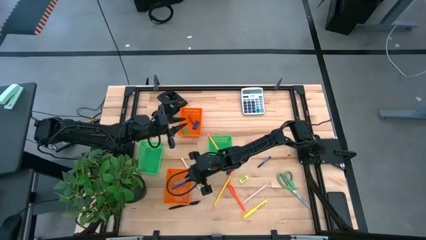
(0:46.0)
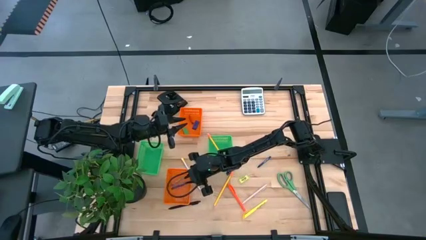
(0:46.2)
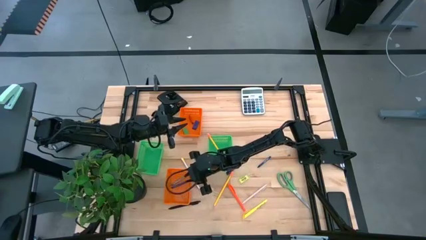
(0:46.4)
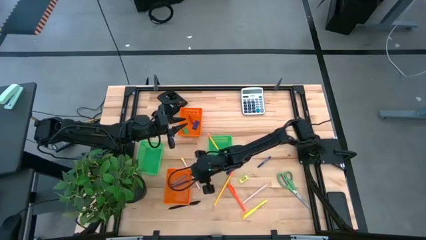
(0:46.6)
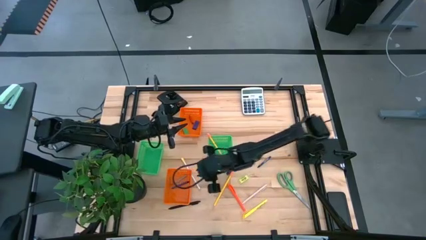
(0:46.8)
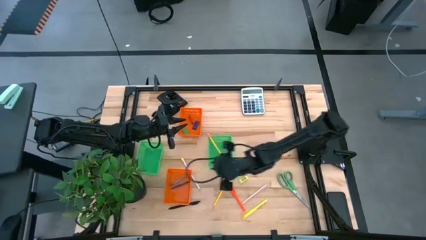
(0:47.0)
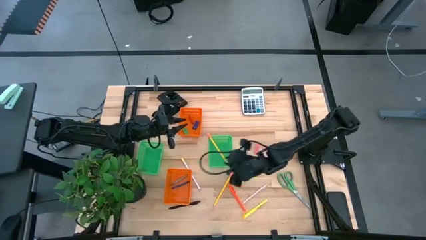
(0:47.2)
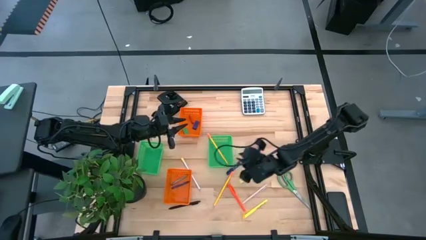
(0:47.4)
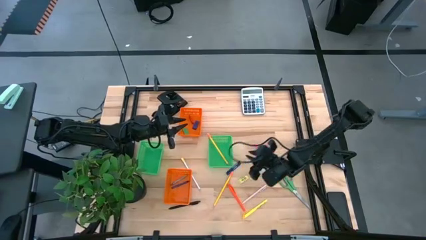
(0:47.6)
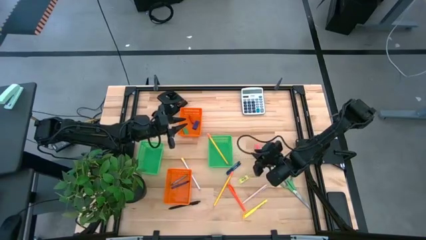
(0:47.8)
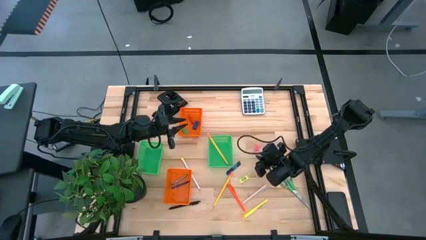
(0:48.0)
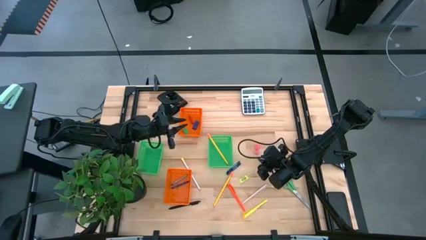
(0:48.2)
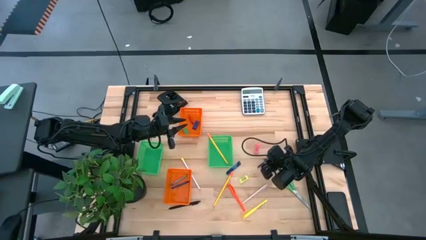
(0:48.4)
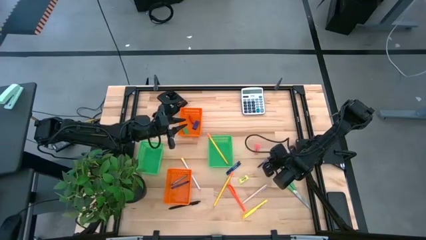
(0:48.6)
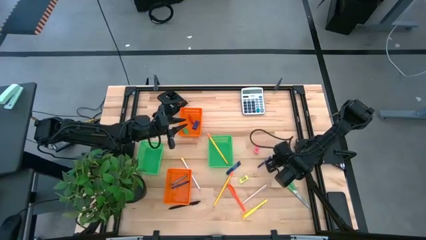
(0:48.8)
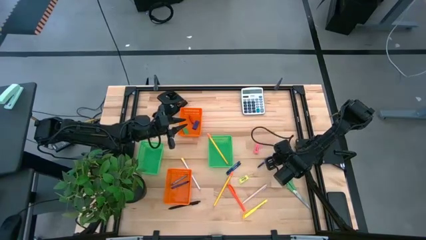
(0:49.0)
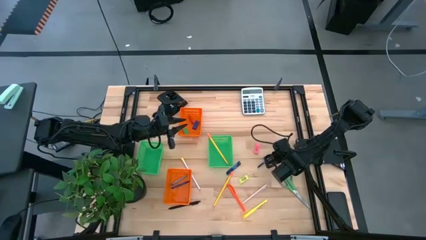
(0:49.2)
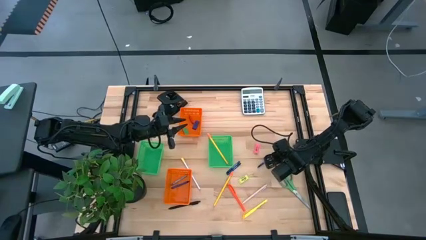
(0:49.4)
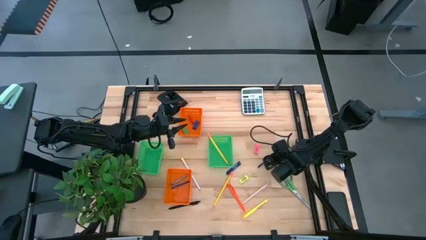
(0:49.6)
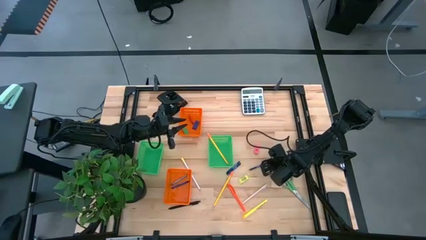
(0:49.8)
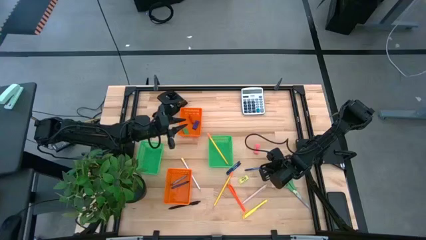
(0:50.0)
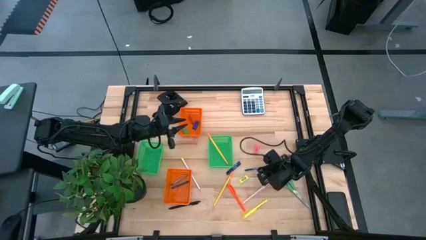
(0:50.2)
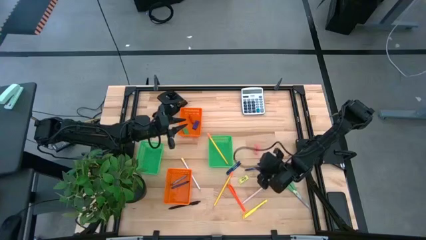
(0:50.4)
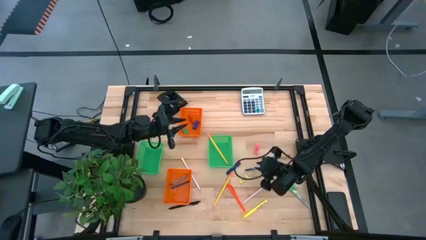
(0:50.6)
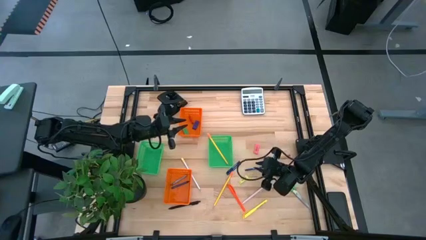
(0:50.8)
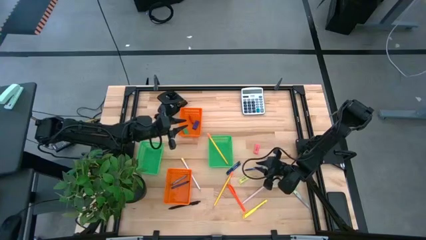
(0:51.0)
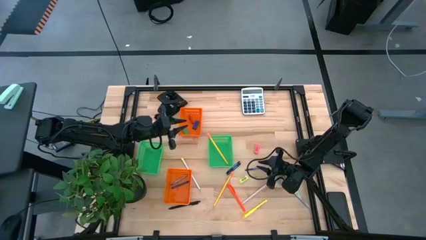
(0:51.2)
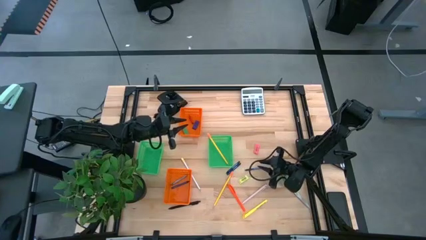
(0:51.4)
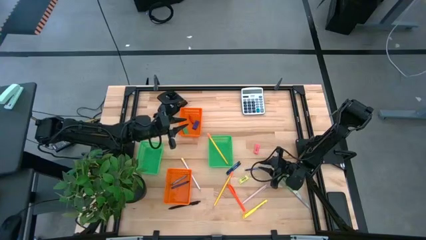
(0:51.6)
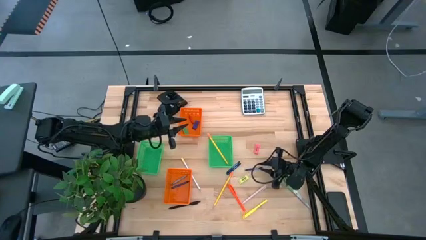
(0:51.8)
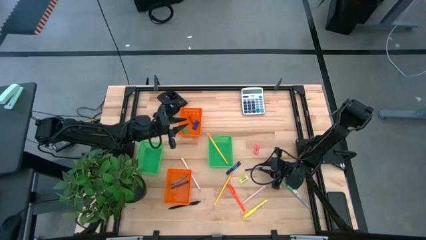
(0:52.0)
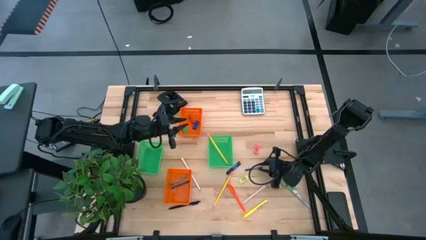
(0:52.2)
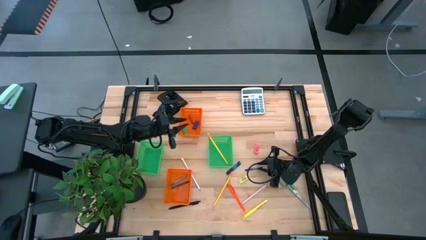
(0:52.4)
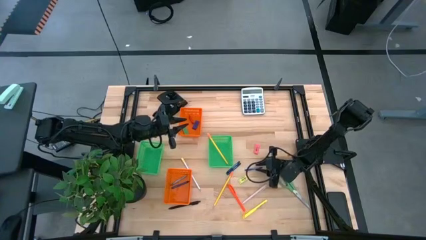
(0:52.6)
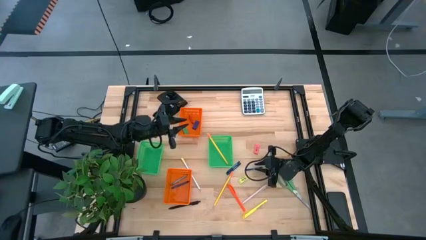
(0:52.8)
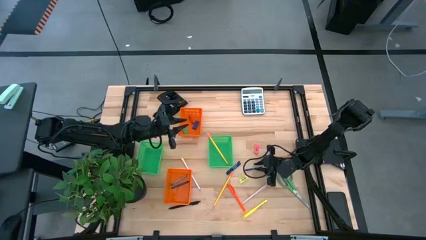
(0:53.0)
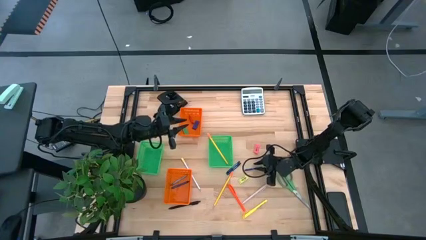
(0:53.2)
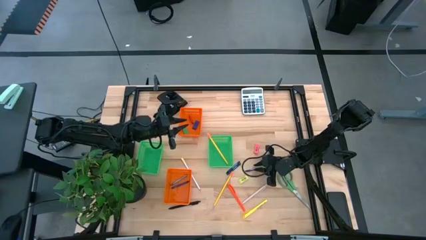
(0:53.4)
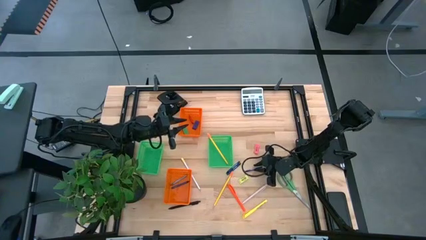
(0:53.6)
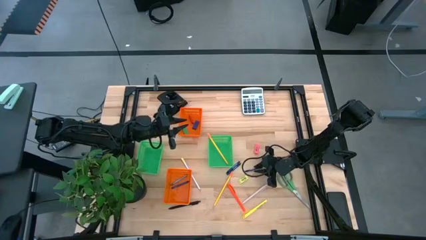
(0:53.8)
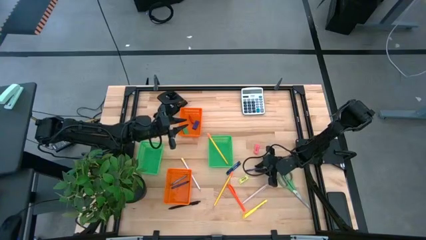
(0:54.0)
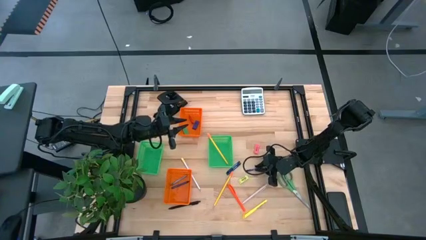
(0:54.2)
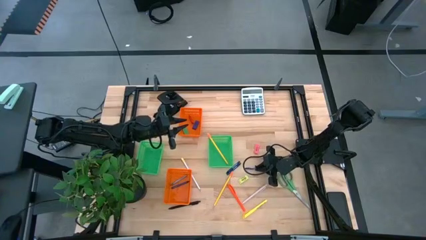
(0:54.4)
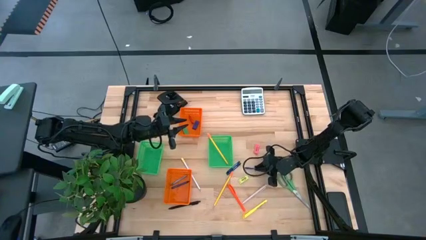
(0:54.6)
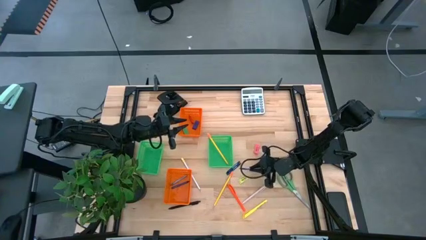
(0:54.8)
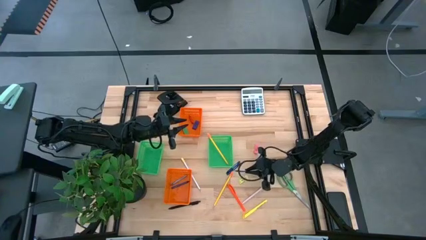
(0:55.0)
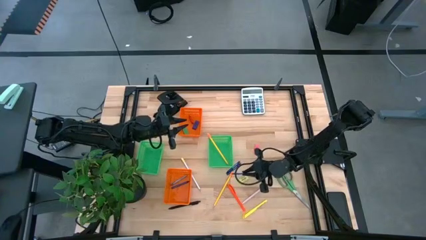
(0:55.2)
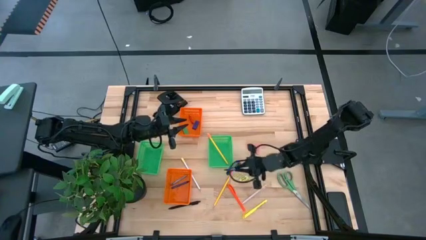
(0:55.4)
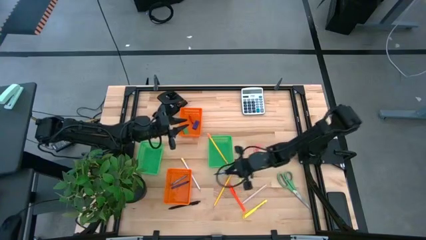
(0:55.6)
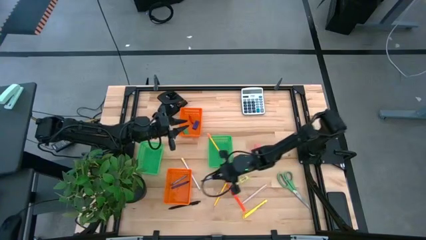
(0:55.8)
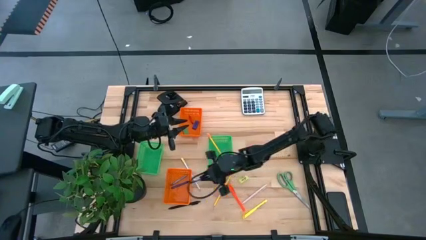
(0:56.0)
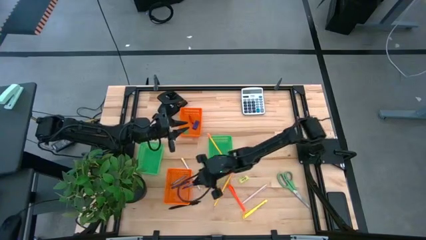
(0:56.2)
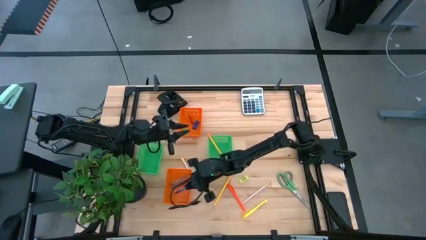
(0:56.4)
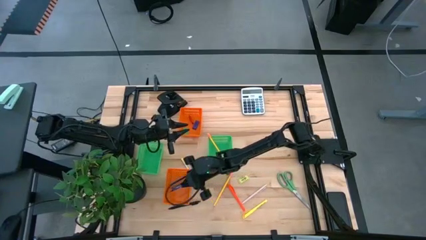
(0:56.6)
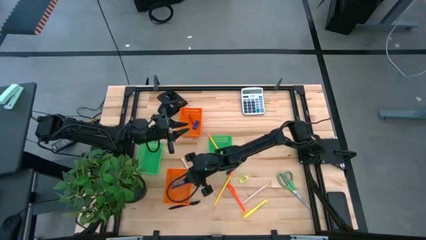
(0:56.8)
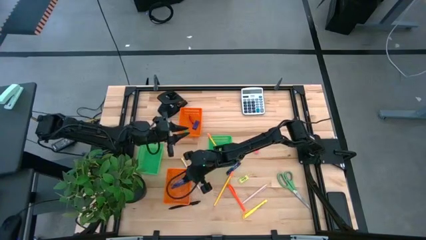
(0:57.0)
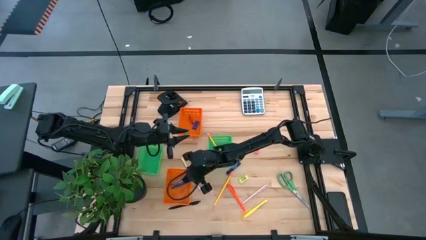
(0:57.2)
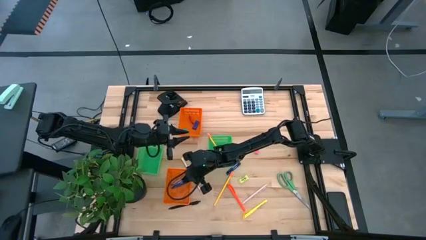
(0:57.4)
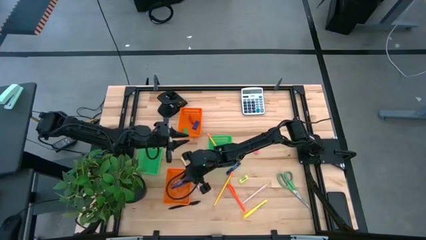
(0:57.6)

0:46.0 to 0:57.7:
Task: Sort crayons/erasers/pens/pencils in bins
Put the blue crayon into the bottom orange basket

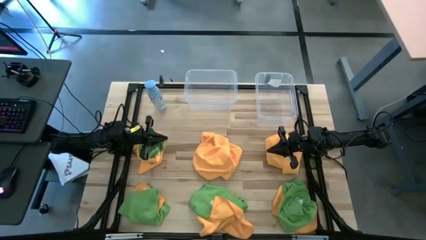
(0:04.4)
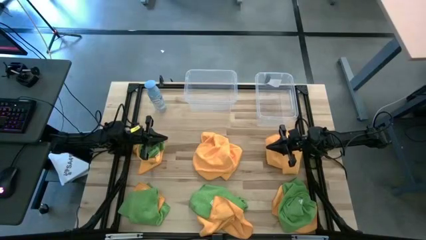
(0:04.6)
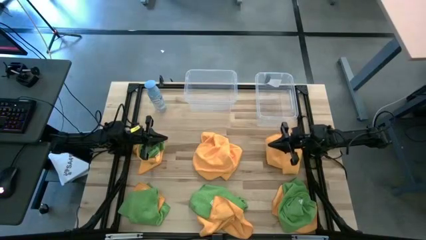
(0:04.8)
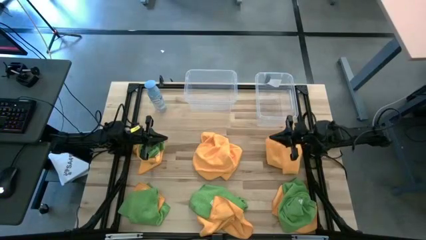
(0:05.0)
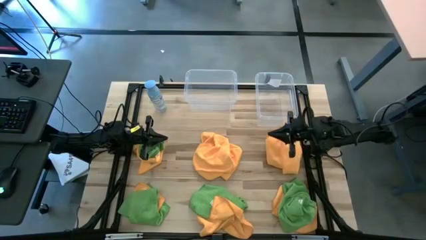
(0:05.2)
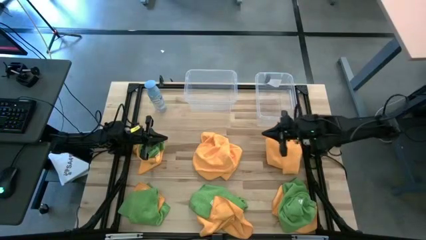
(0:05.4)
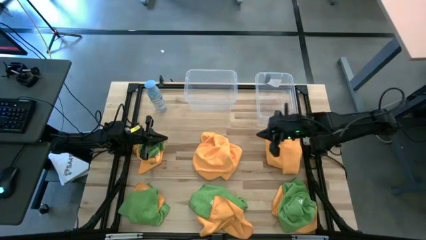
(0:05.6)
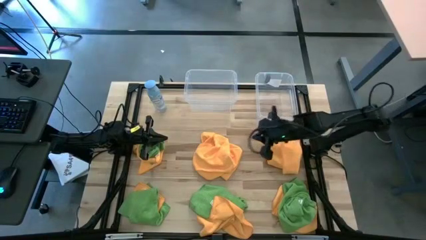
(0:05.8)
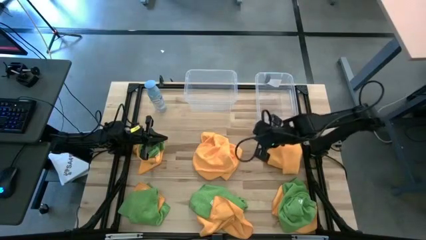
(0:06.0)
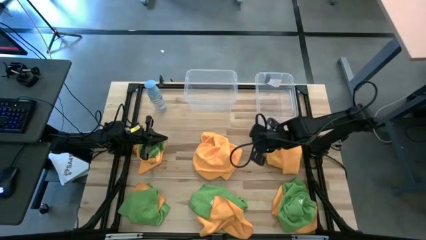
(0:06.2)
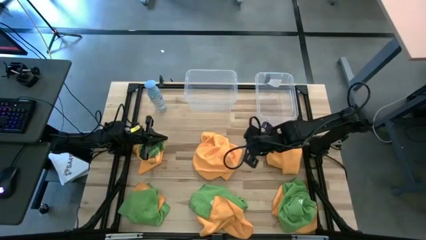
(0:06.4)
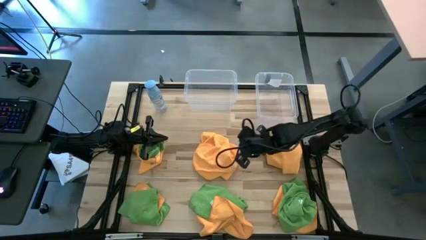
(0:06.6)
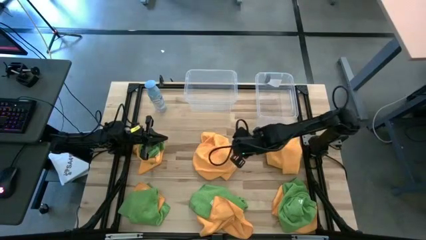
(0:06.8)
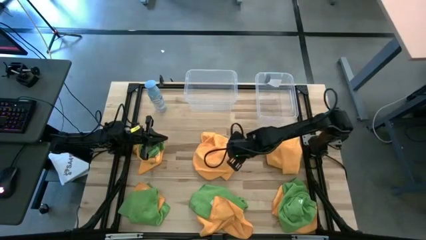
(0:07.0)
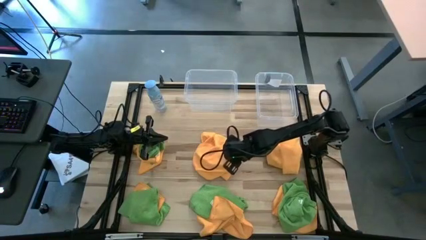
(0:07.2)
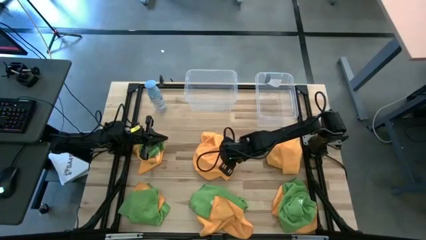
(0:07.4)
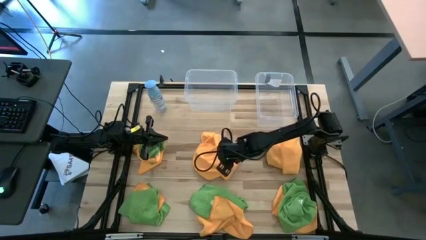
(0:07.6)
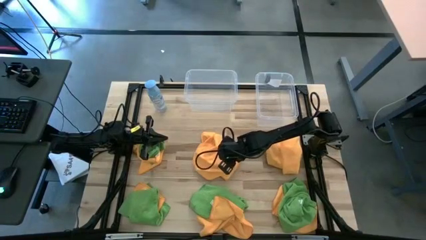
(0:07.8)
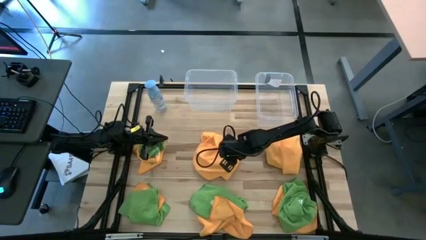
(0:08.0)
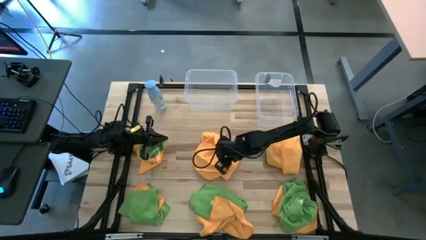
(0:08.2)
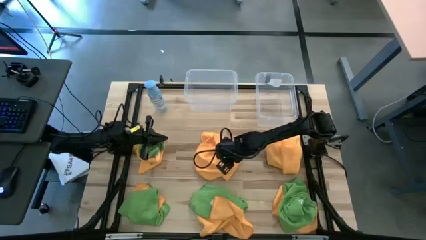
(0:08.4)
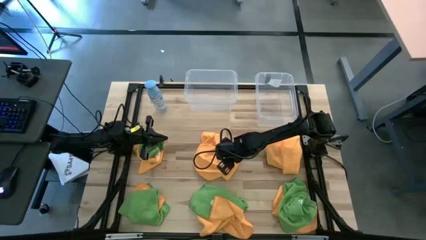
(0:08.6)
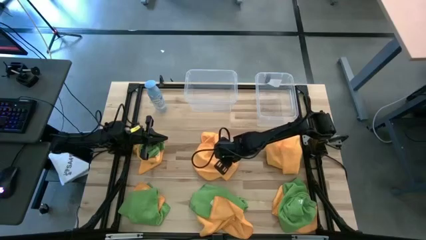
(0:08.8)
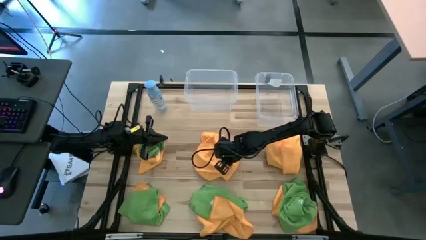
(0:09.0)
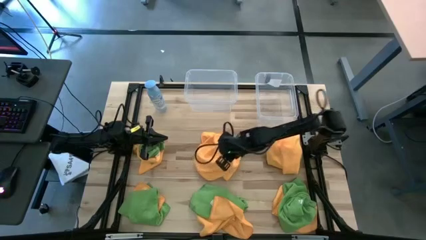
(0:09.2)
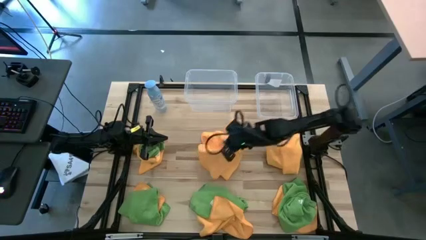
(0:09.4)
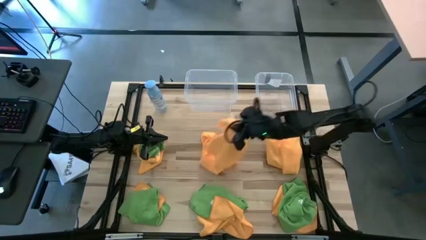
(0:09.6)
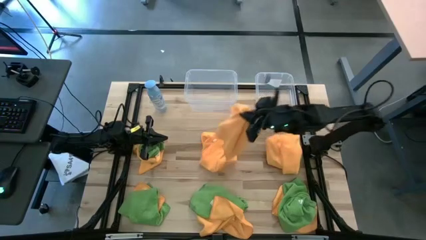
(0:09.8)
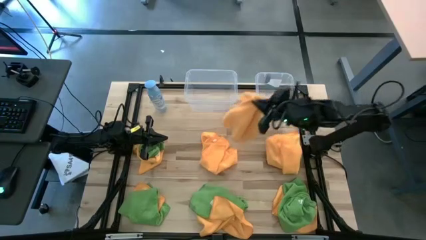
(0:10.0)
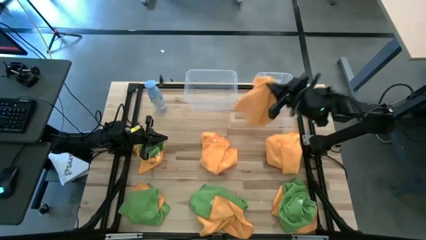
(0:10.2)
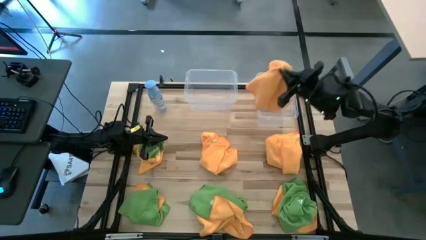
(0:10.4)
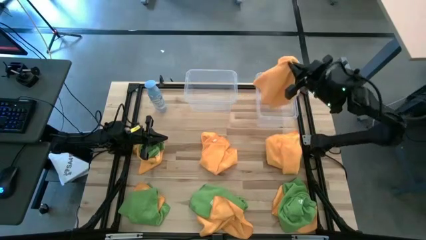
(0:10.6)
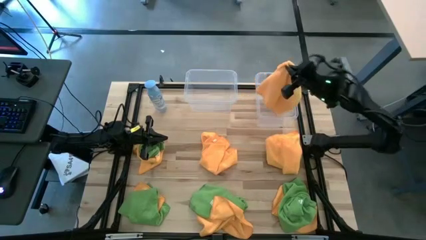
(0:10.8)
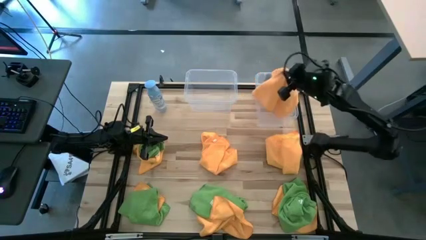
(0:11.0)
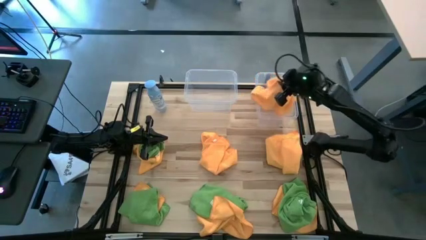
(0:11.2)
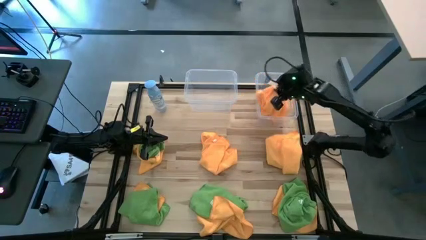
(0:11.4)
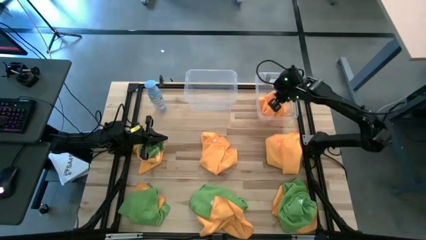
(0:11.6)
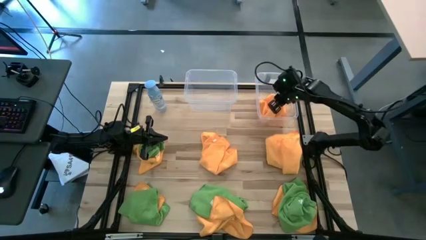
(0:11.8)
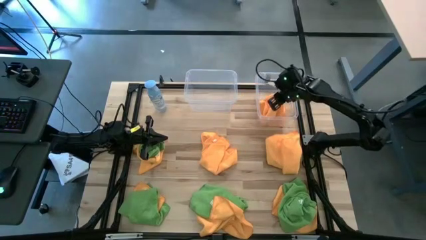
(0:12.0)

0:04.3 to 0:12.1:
Task: Sort microfiber towel by color & place in baskets
Put the yellow towel into the right transparent bin
